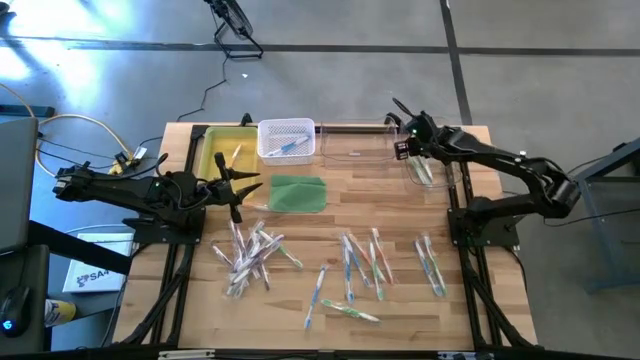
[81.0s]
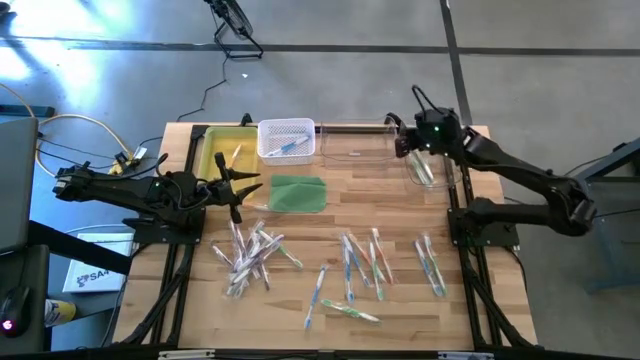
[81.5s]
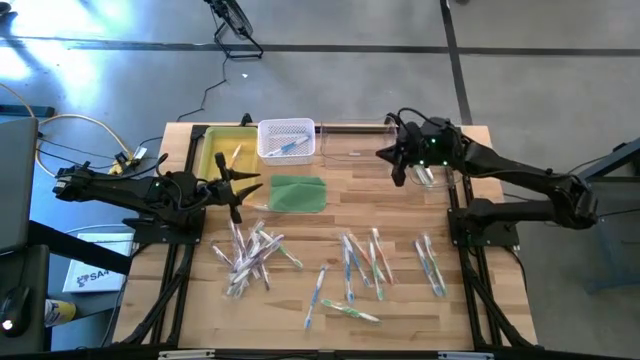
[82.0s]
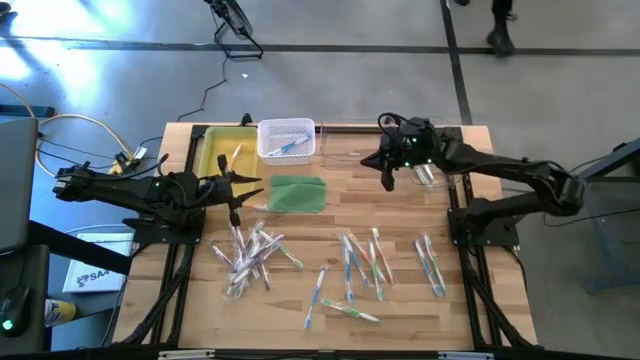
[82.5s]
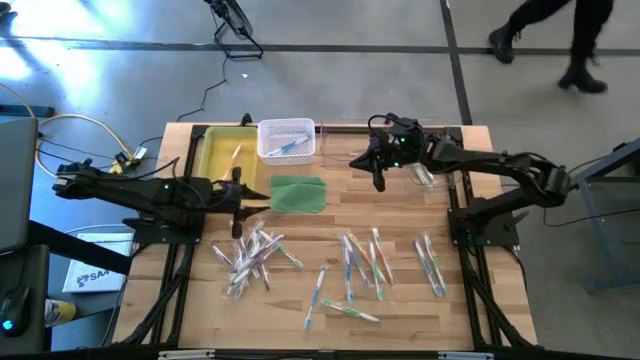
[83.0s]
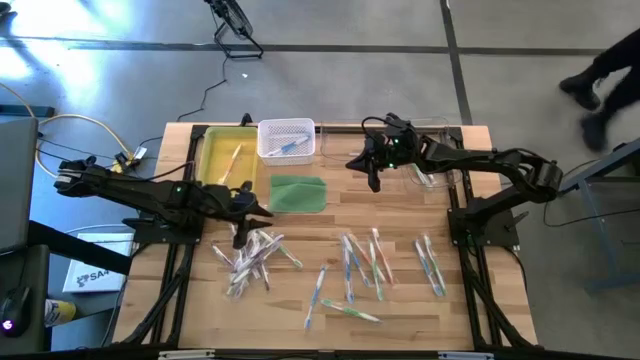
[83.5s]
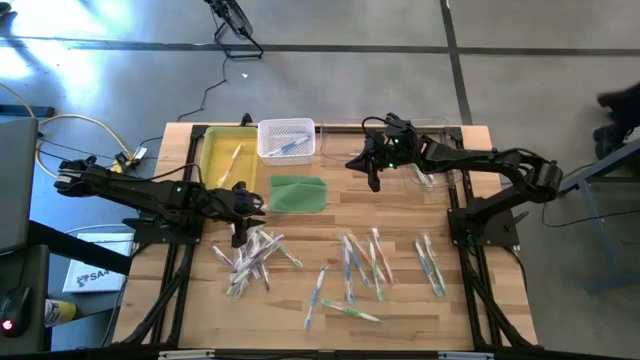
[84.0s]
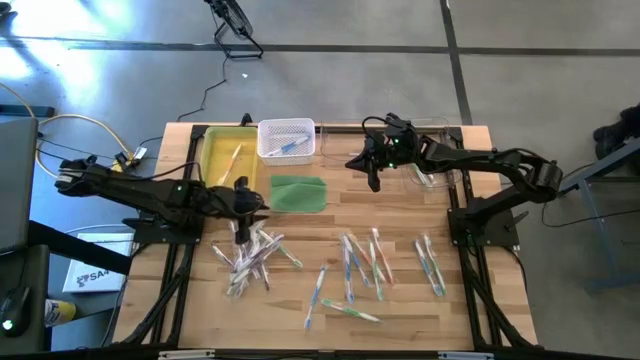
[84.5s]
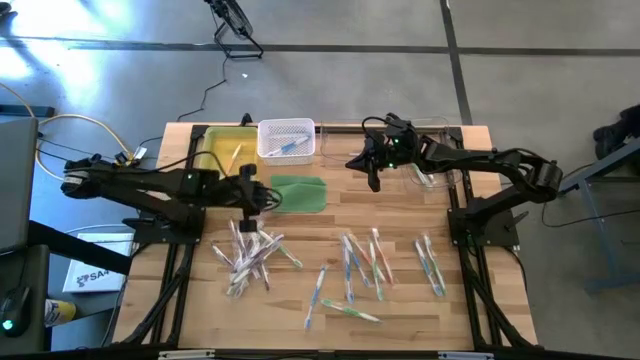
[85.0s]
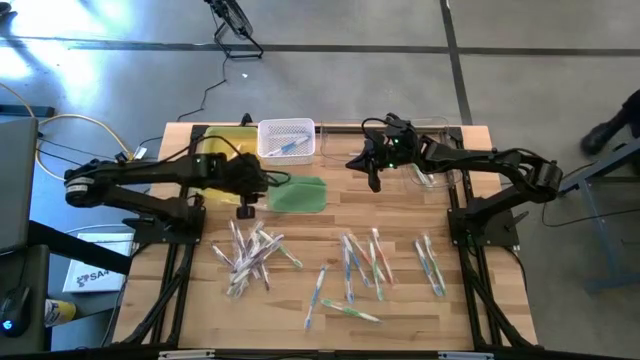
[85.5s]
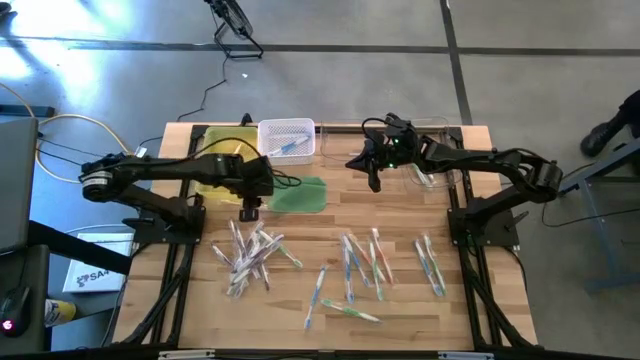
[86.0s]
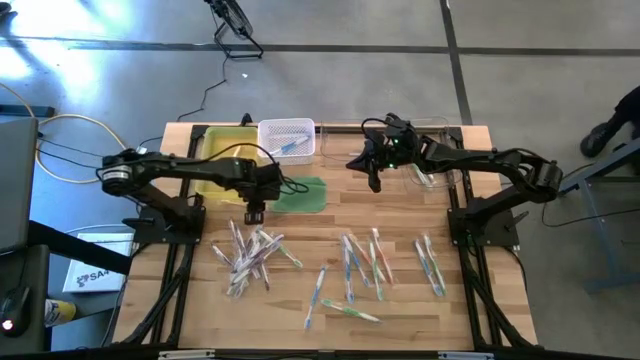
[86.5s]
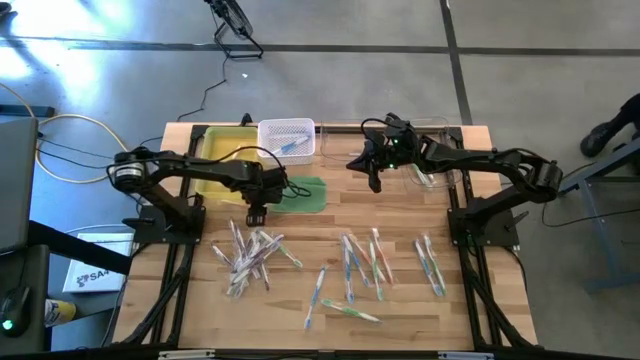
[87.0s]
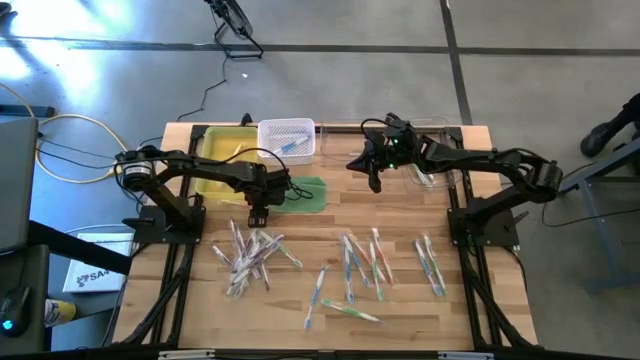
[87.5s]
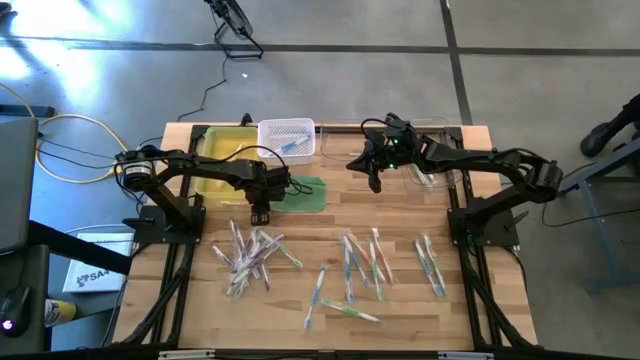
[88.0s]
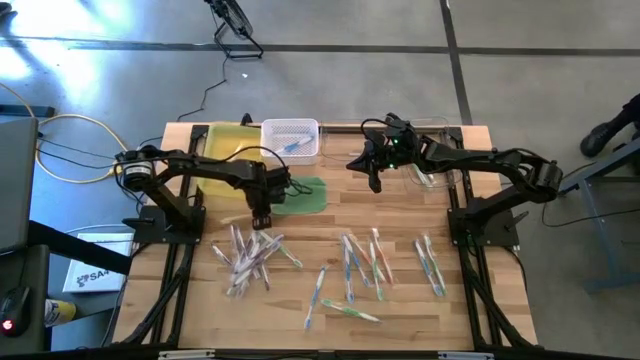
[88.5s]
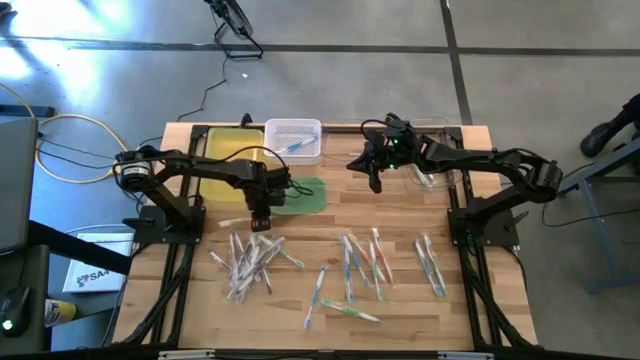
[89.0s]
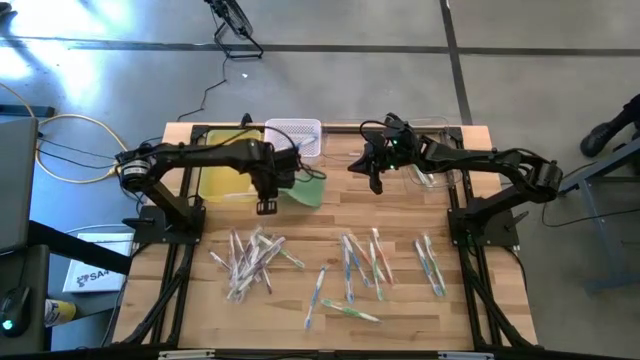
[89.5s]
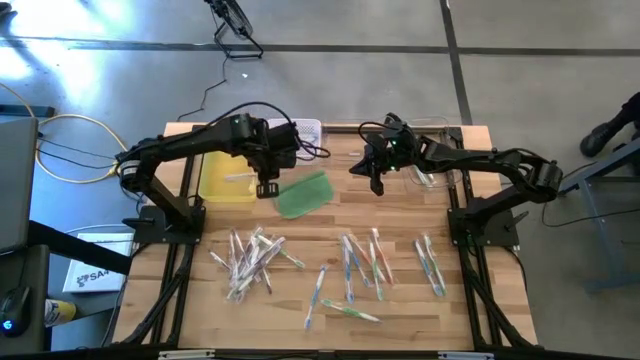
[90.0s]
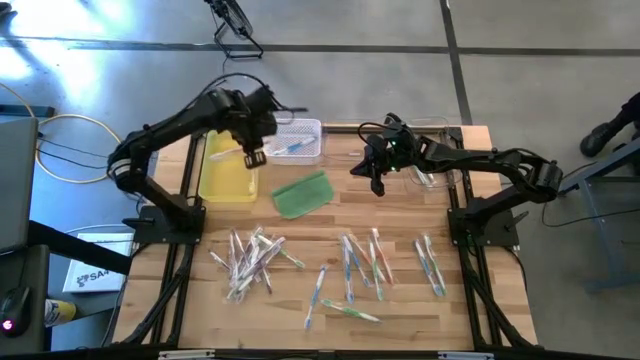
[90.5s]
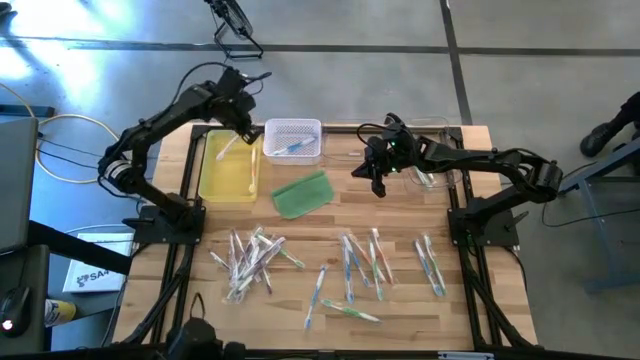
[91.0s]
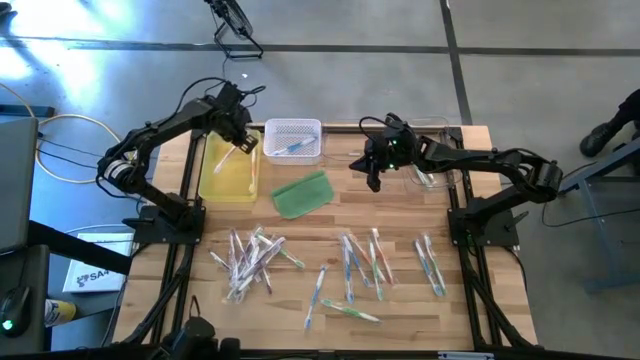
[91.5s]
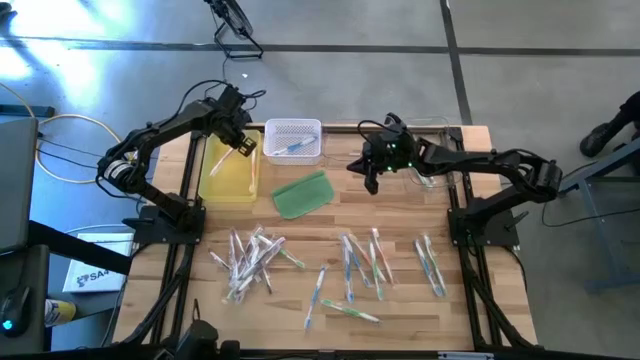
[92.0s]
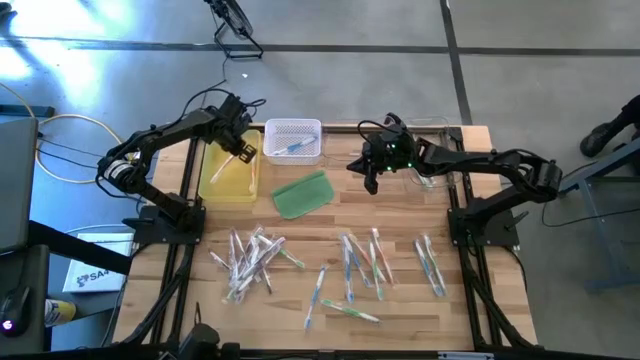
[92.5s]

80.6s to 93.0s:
Task: Pick & Place Toothbrushes
Put the orange toothbrush into the yellow bin

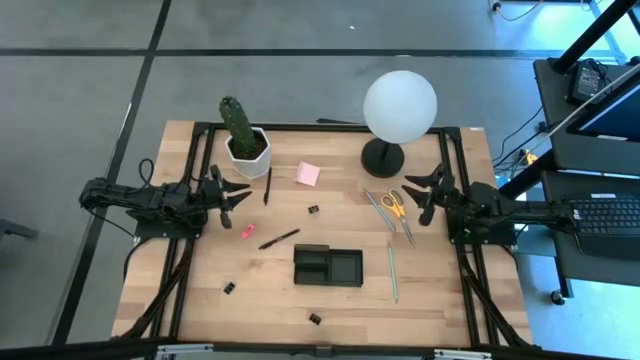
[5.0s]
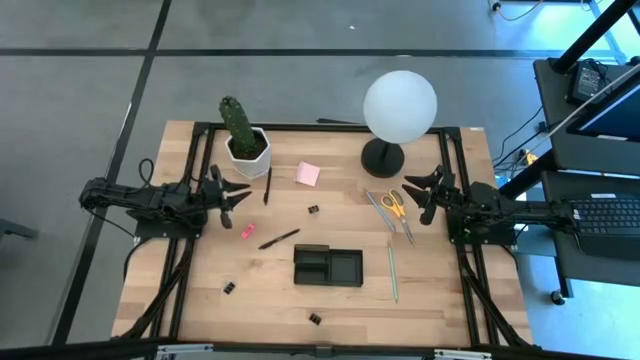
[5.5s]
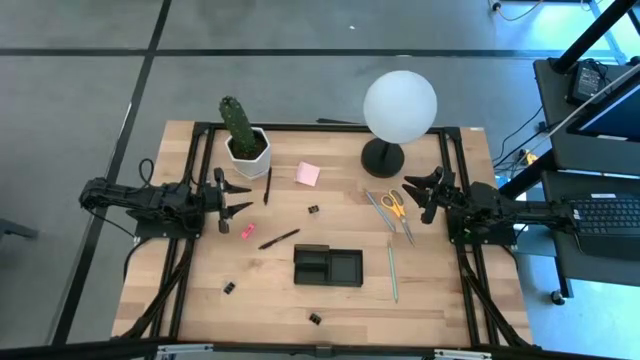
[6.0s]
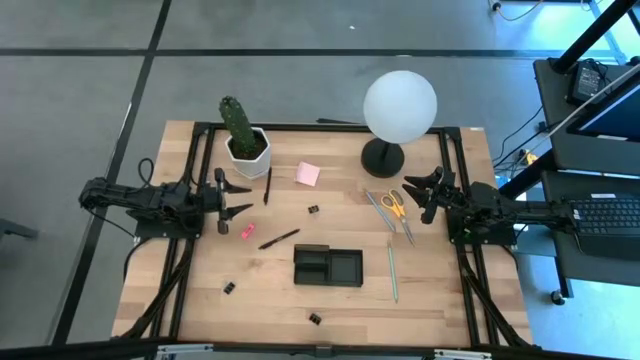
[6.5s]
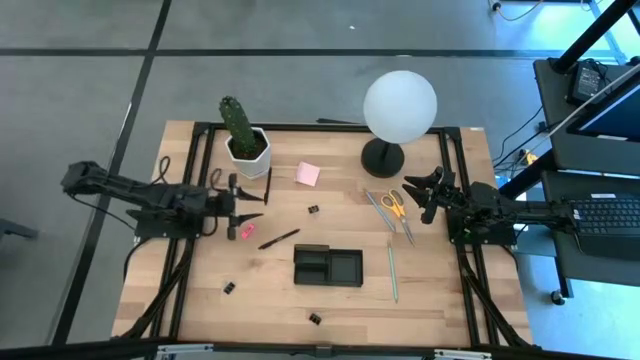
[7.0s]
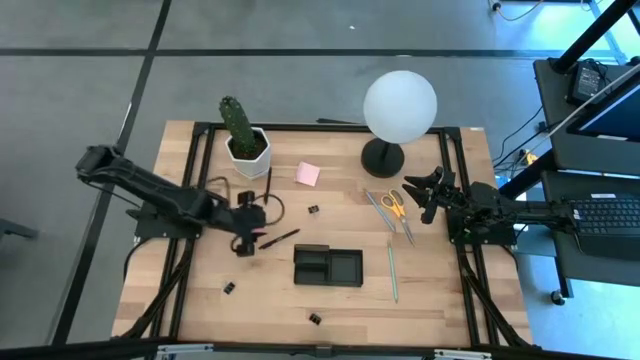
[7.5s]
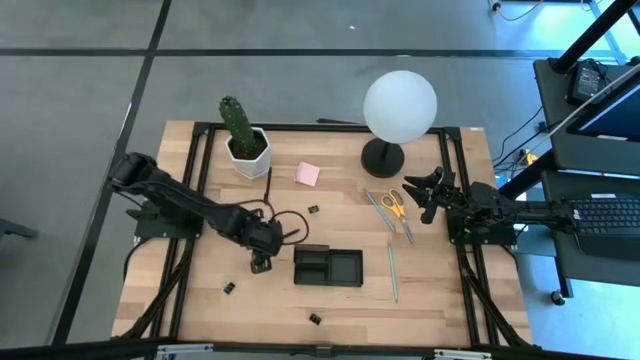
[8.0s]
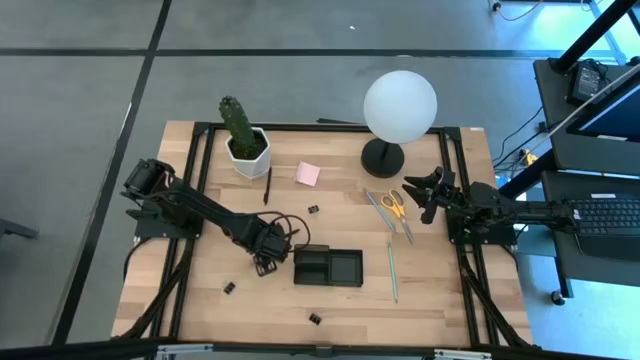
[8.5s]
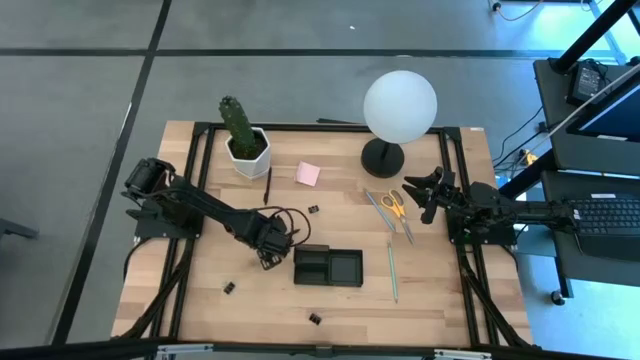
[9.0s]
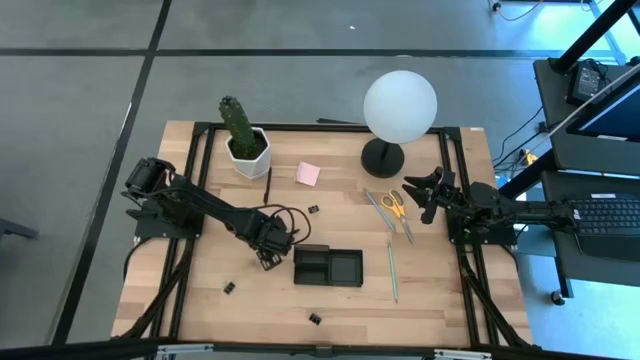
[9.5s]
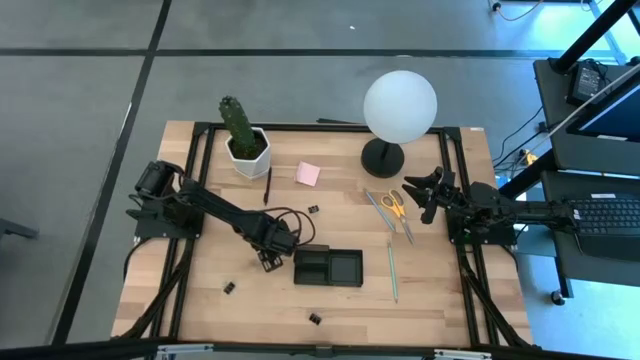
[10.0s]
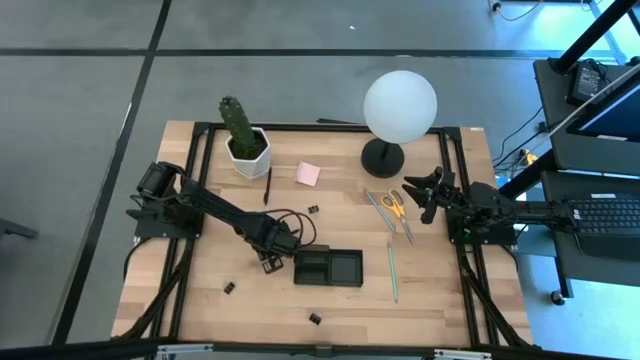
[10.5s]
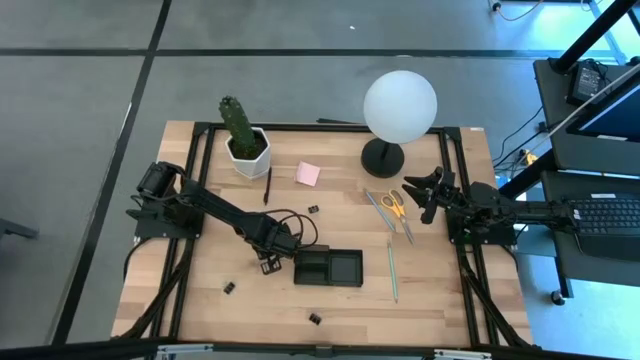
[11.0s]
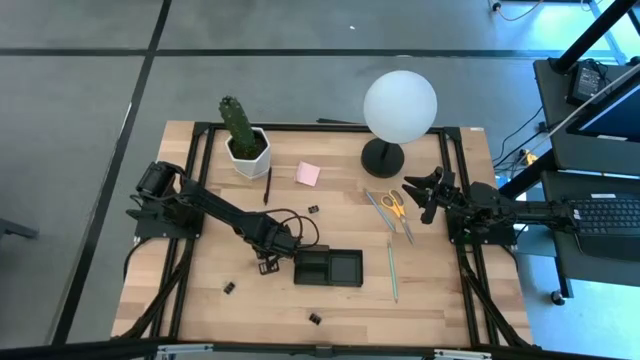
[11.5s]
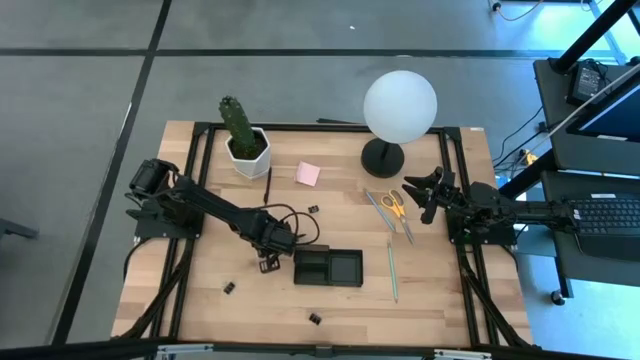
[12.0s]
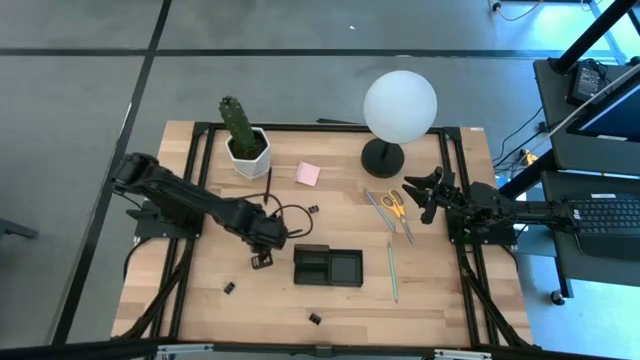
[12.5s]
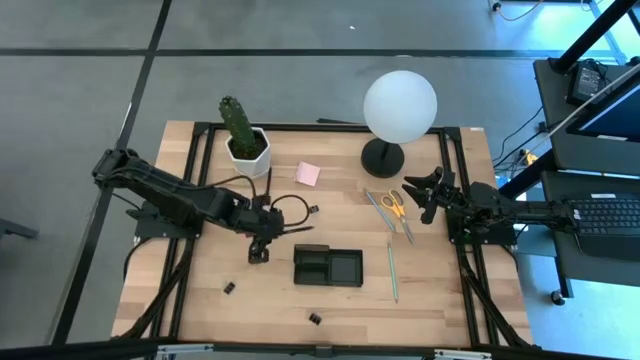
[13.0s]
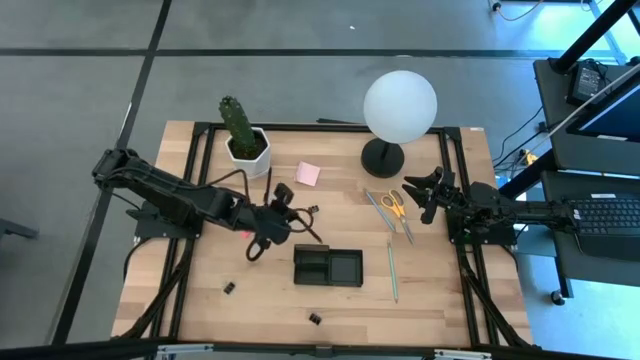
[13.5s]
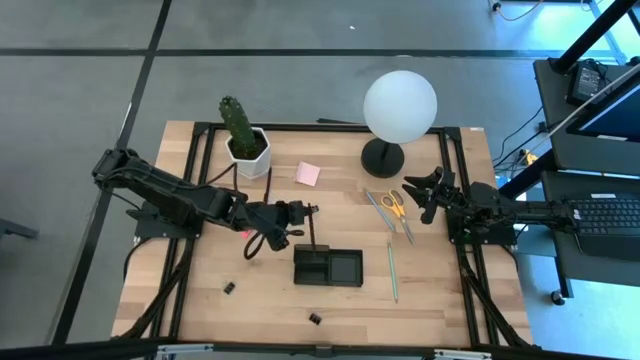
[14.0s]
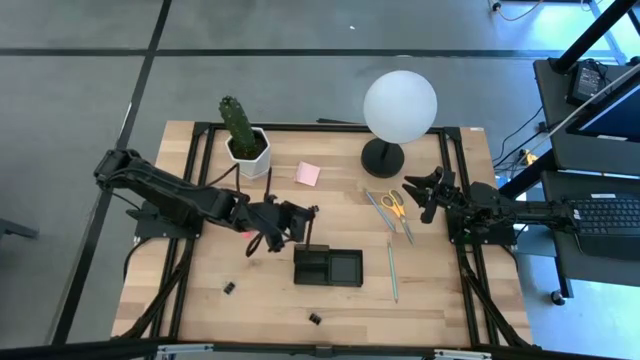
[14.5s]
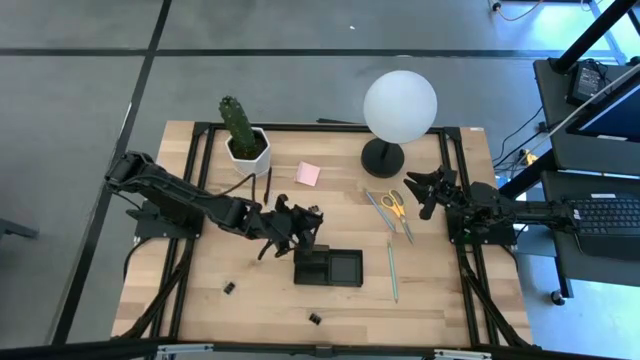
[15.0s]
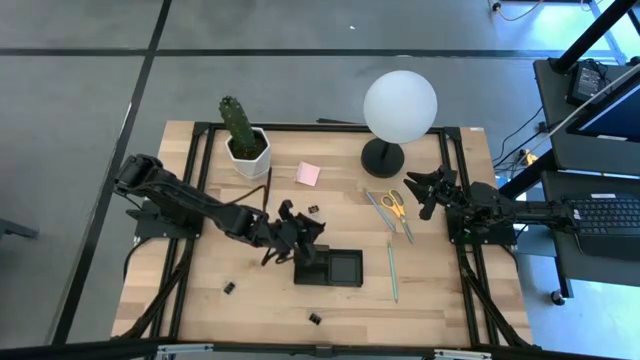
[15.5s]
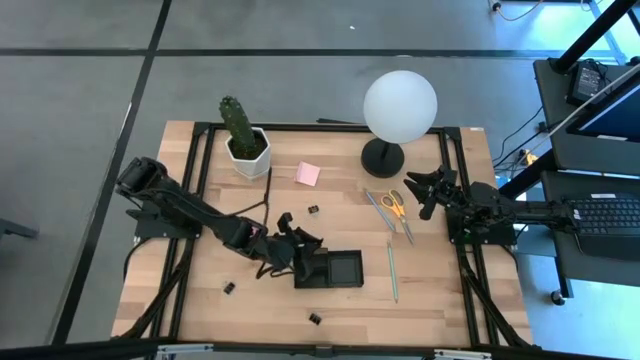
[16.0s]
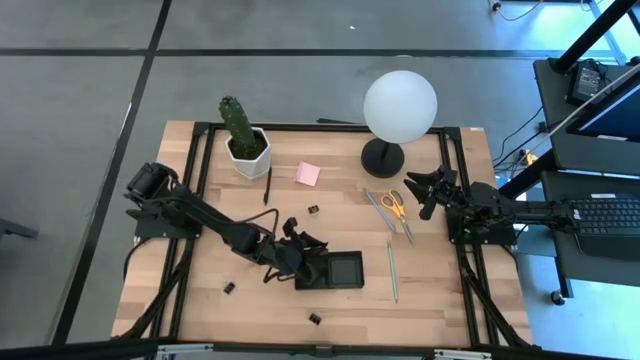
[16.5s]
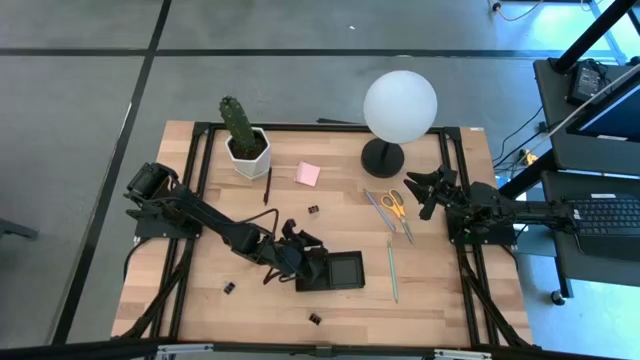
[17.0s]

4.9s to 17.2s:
Task: Pick and place office supplies into organizer
Put the bottom black pen into the mesh desk organizer
